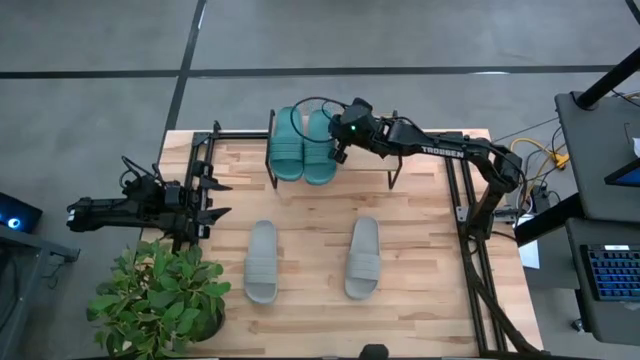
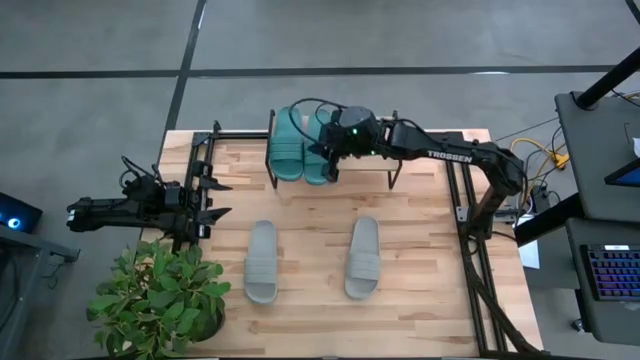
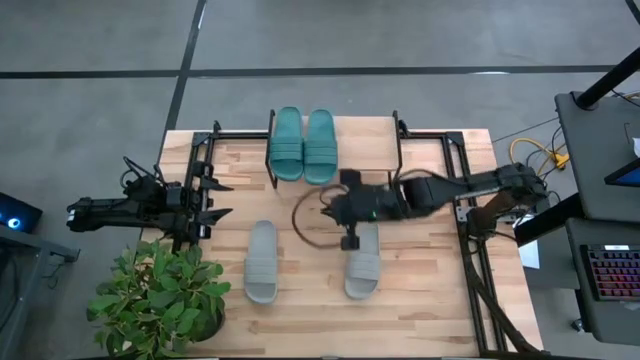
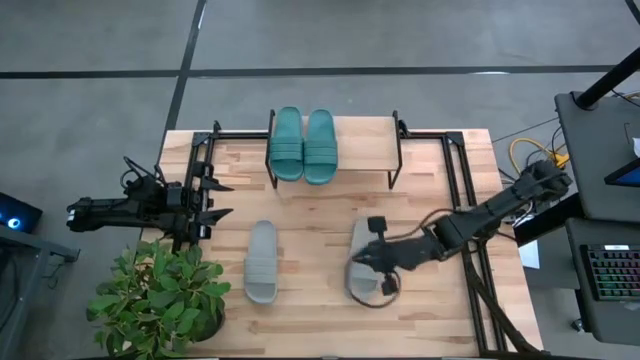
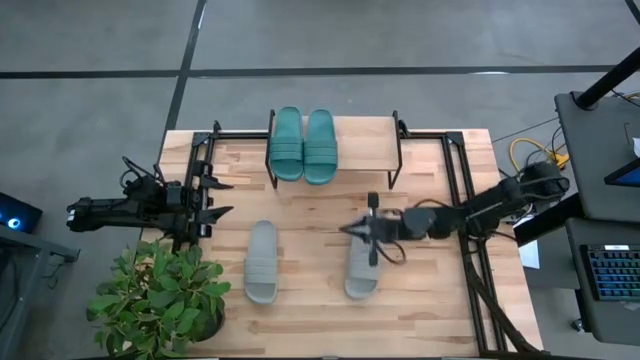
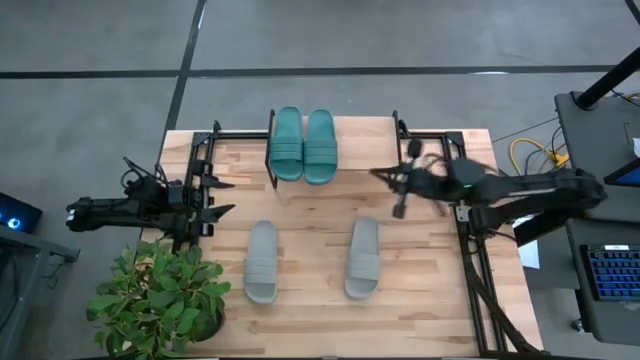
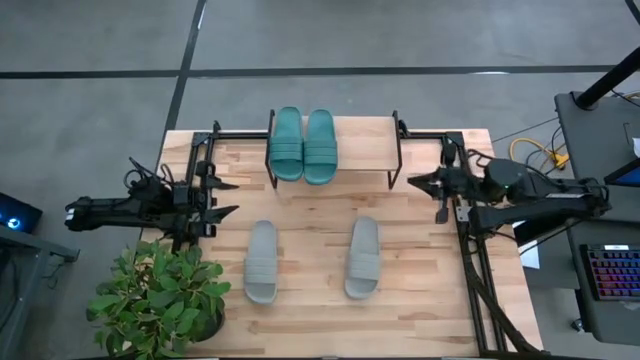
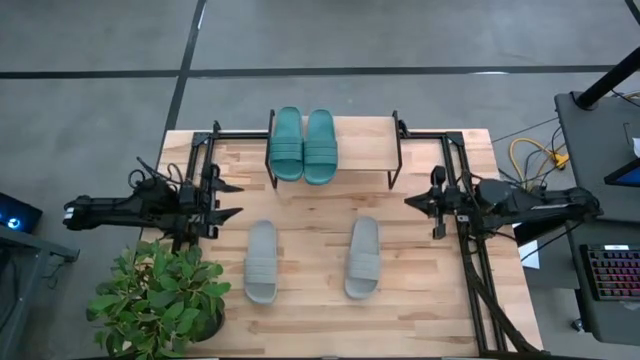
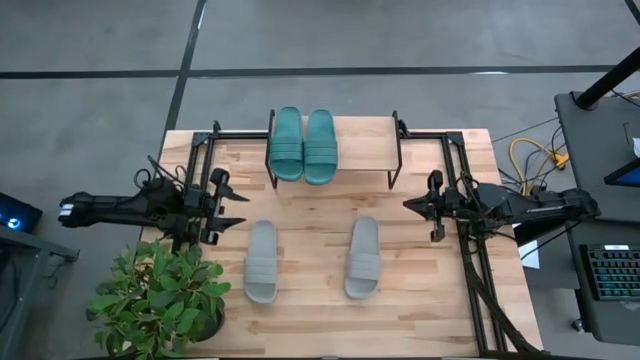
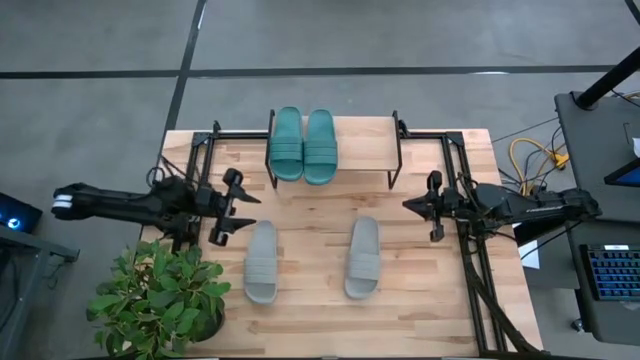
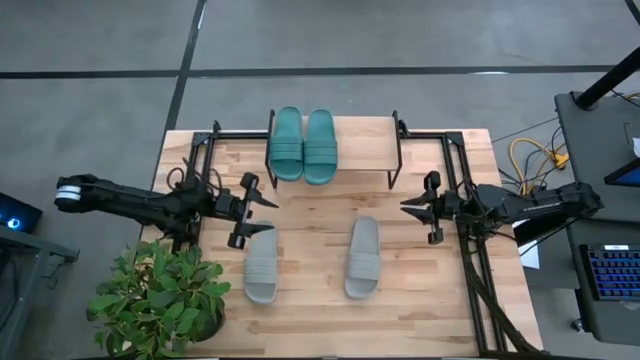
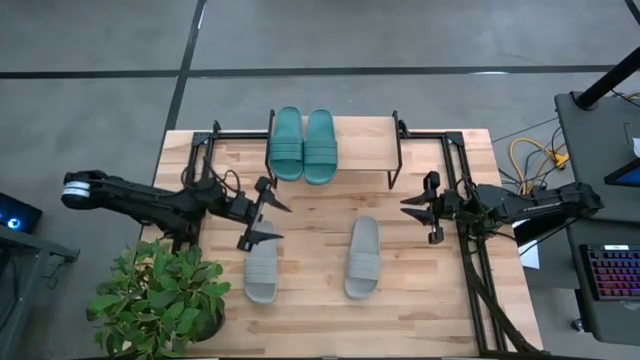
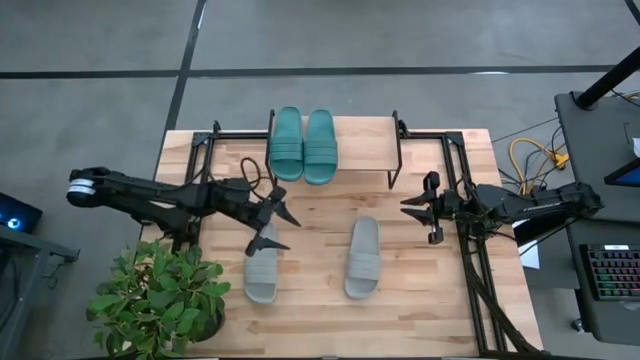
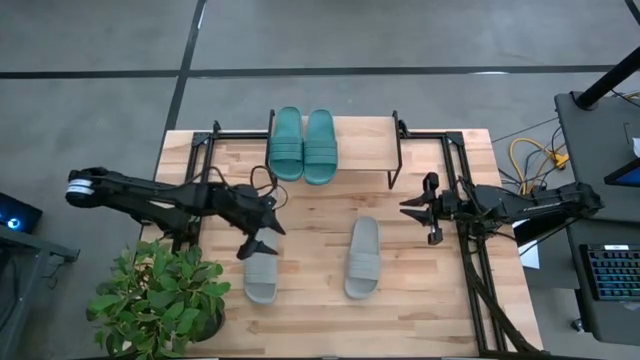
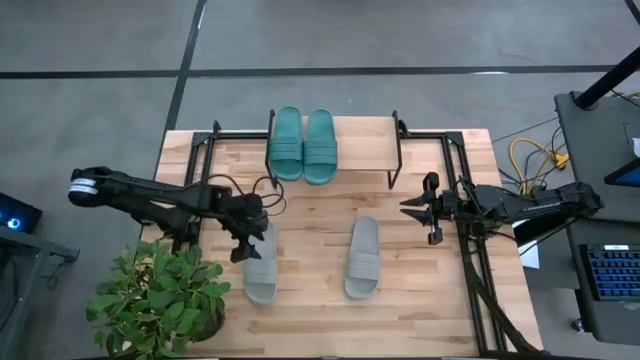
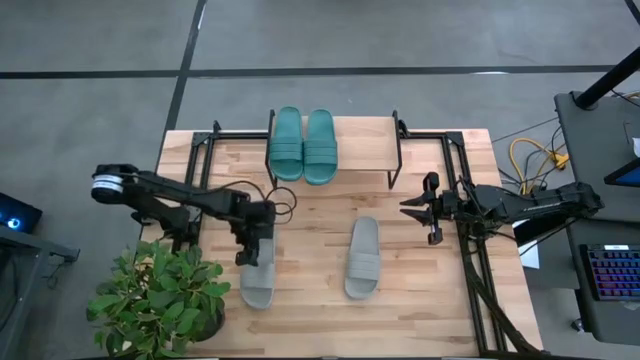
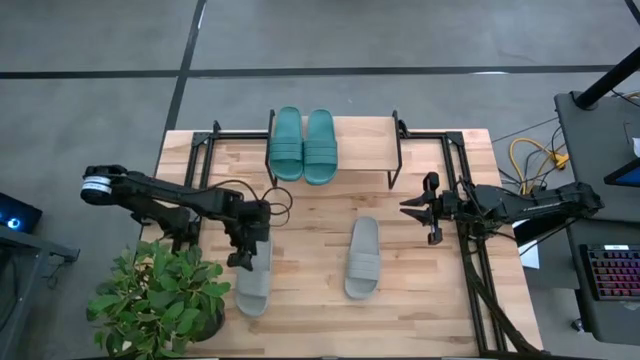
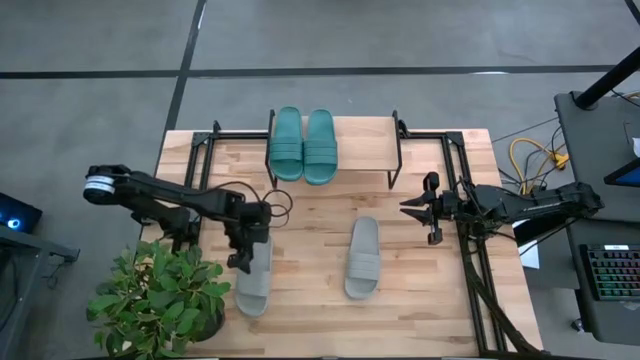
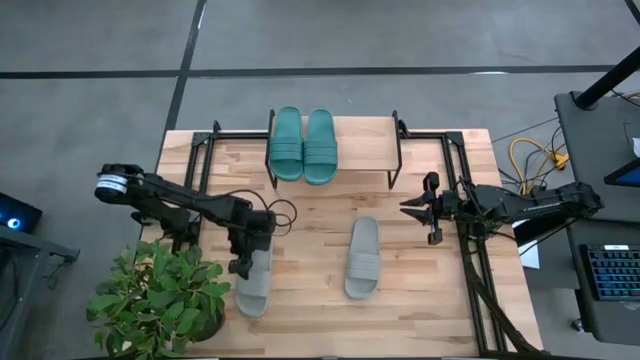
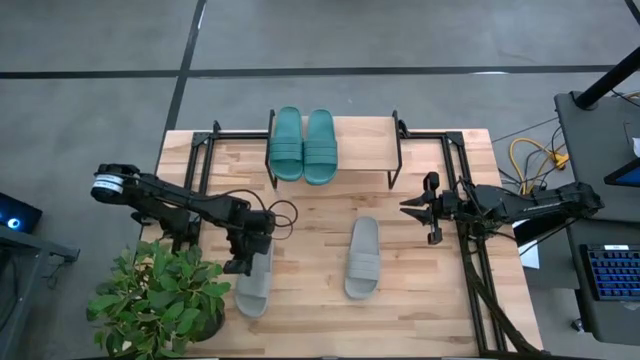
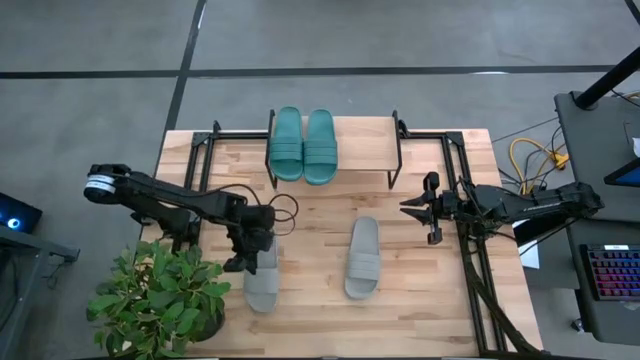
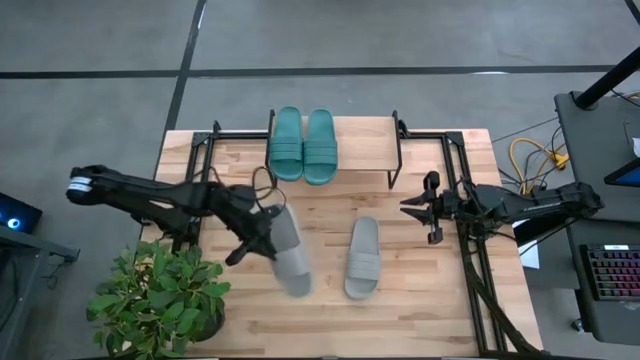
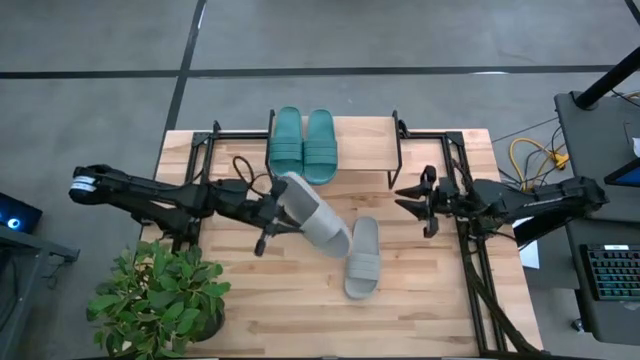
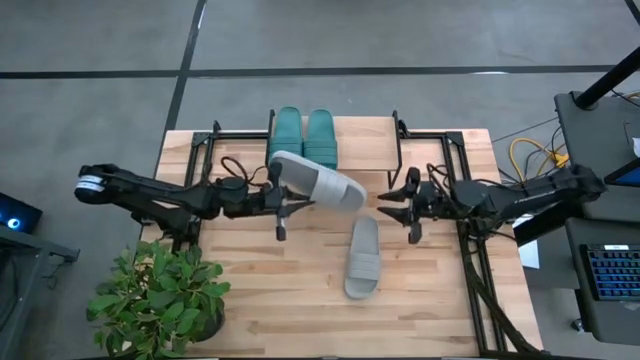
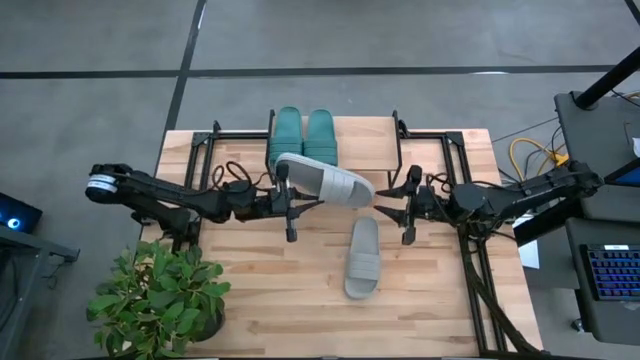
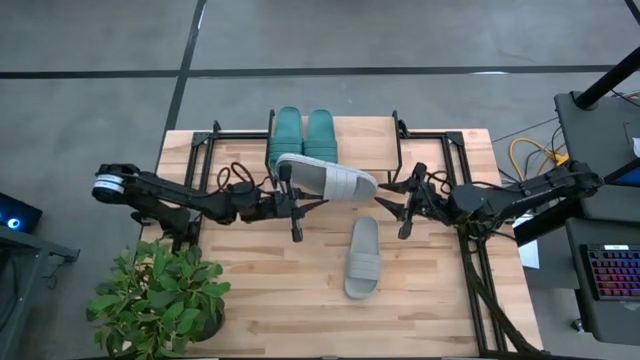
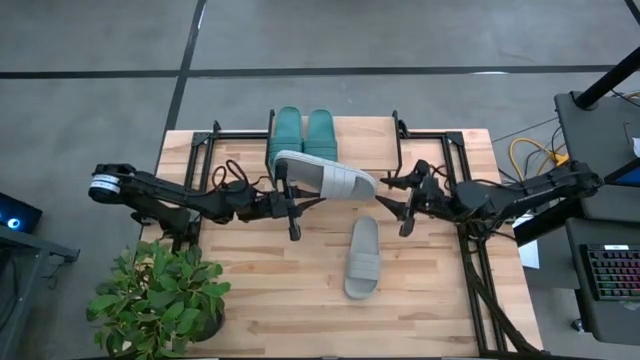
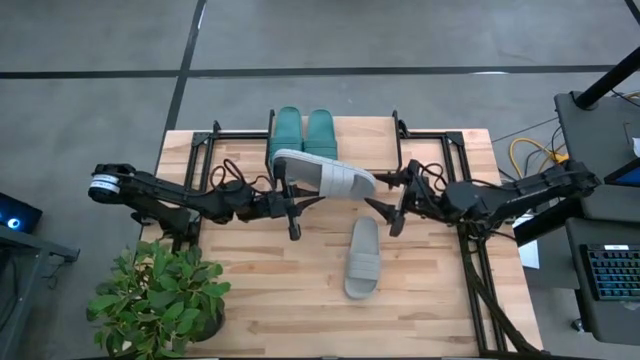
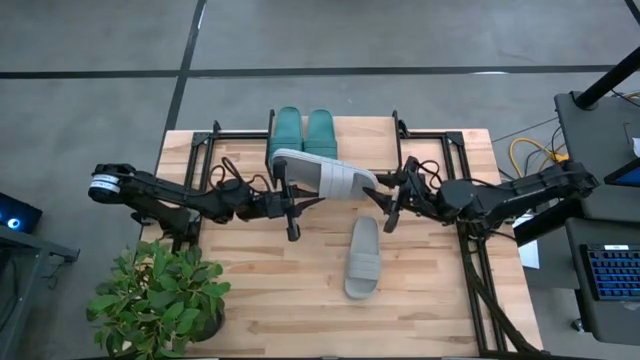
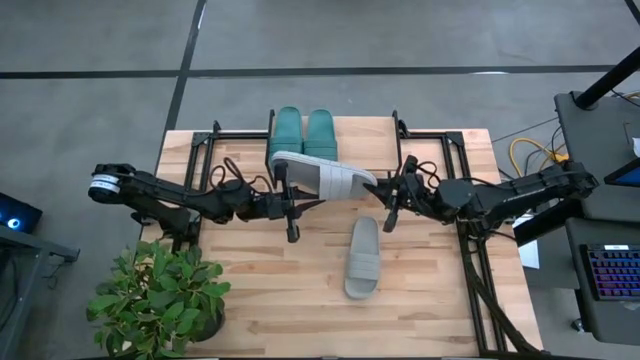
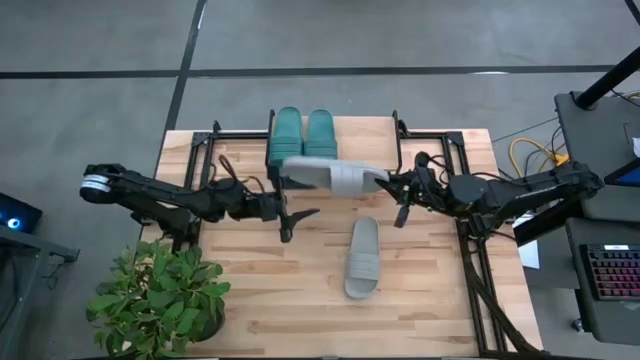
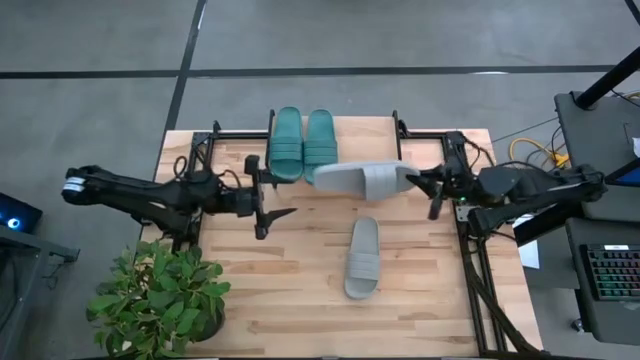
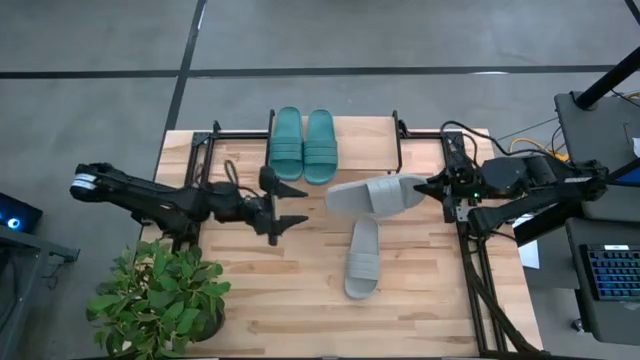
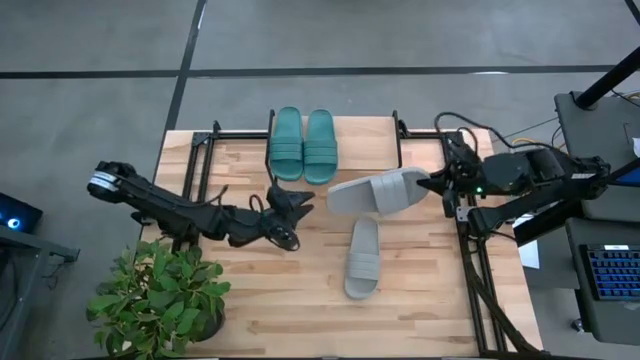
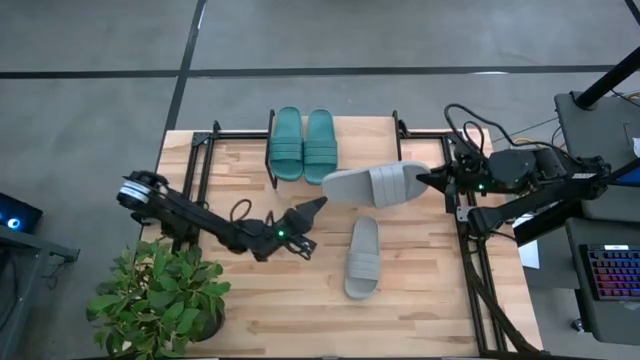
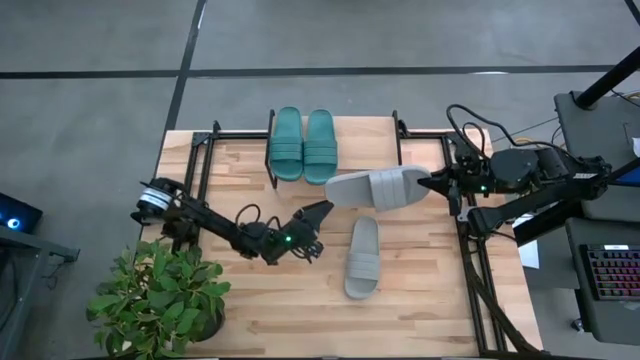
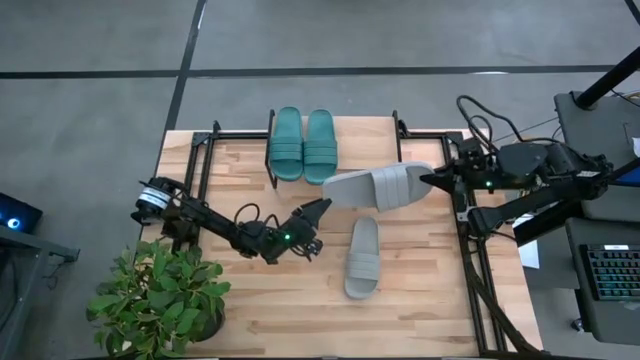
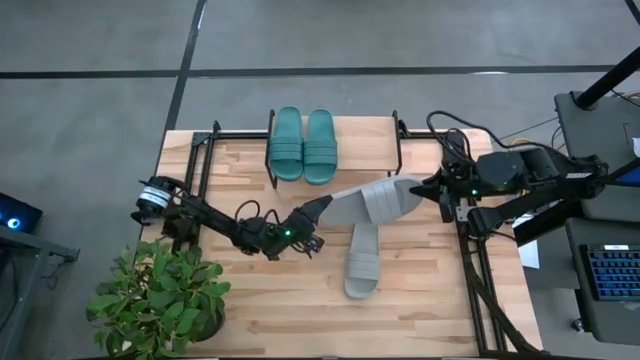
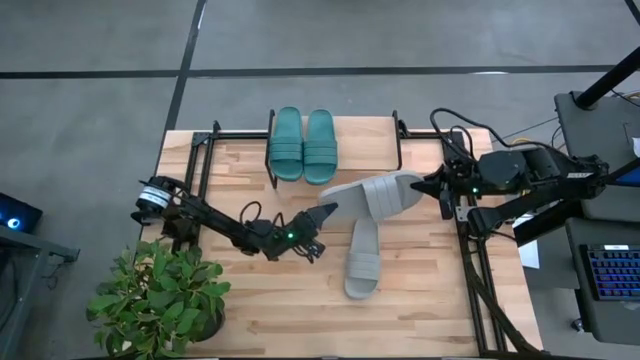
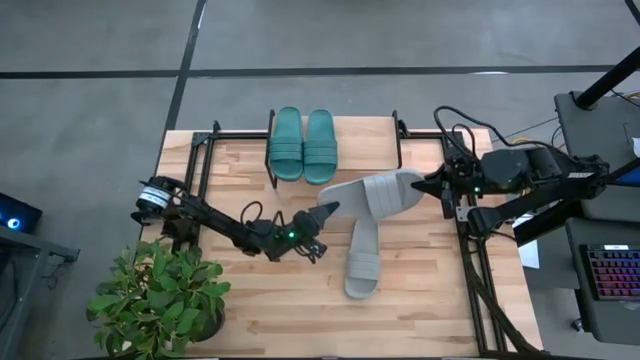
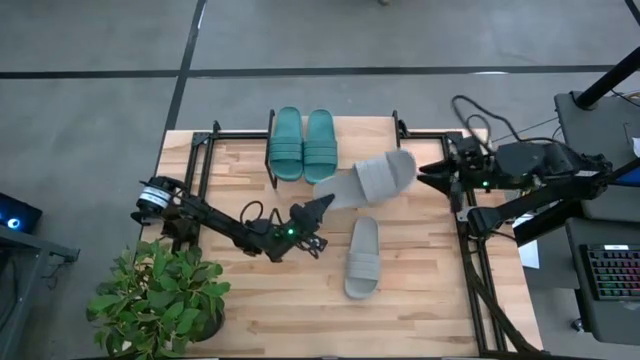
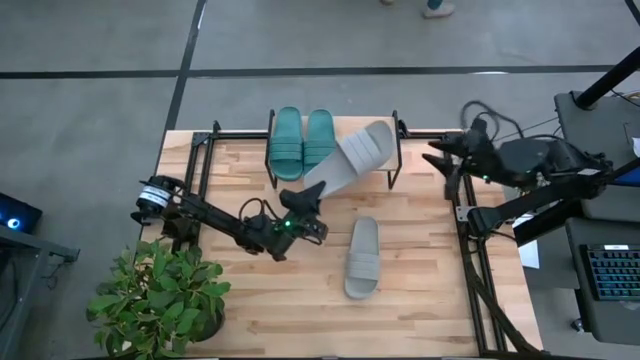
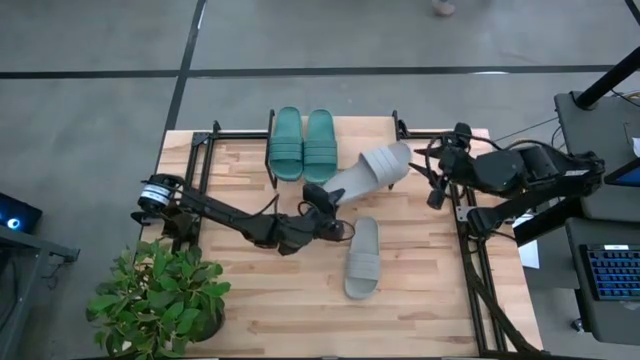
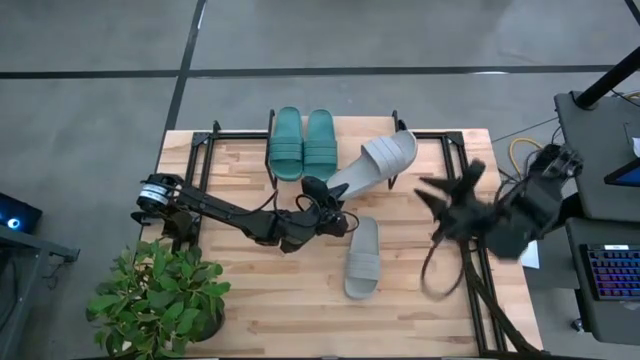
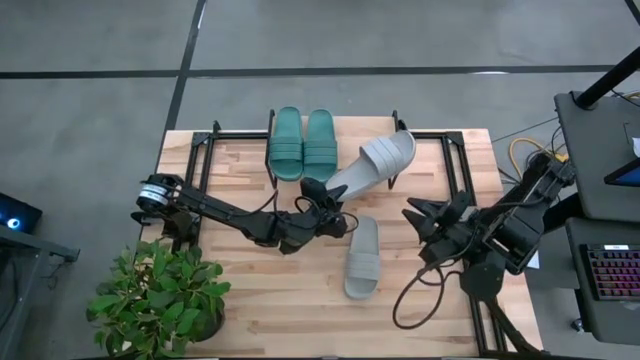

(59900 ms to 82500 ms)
Task: Pick and place slides into the shelf
Put the left gray slide on the shelf
